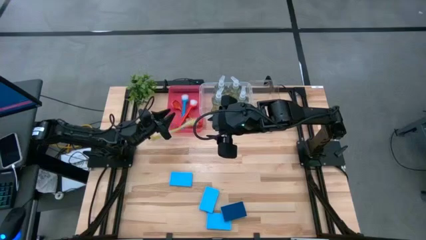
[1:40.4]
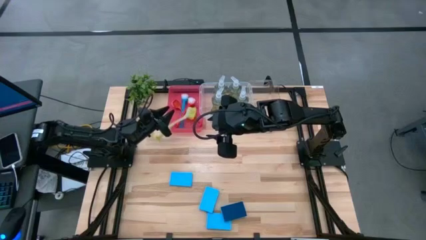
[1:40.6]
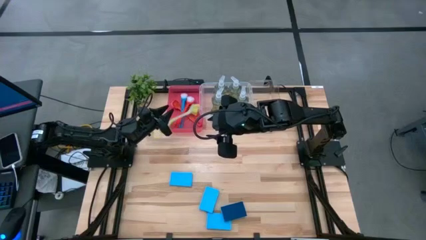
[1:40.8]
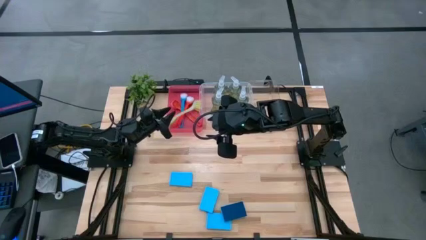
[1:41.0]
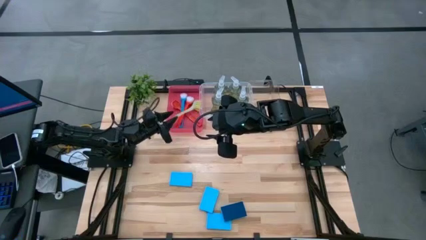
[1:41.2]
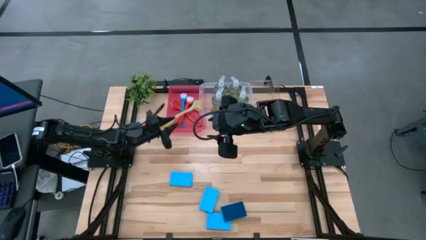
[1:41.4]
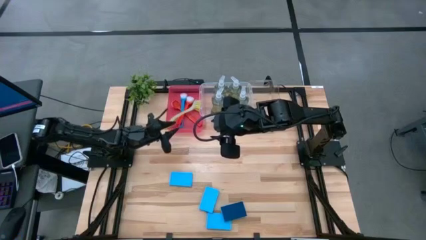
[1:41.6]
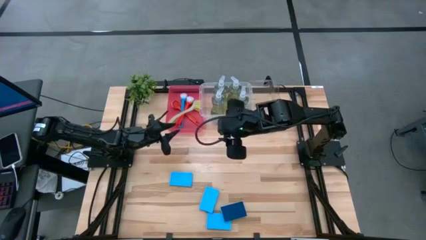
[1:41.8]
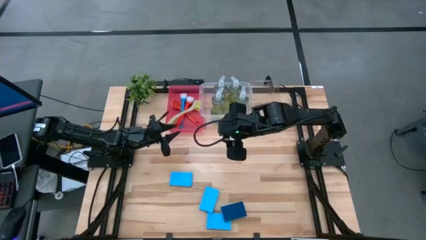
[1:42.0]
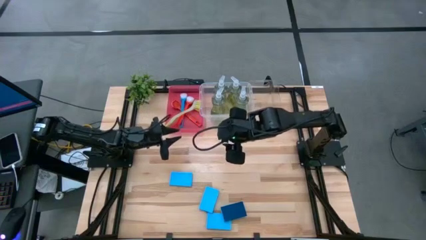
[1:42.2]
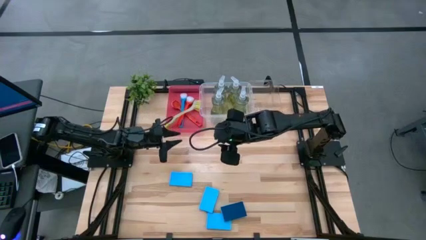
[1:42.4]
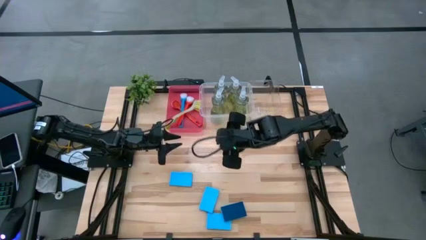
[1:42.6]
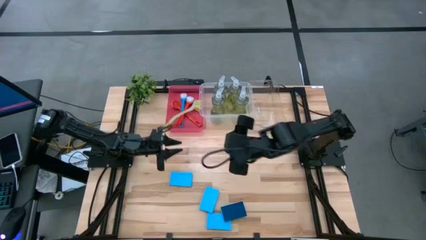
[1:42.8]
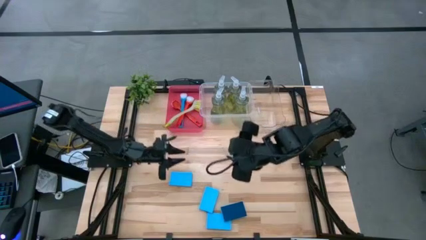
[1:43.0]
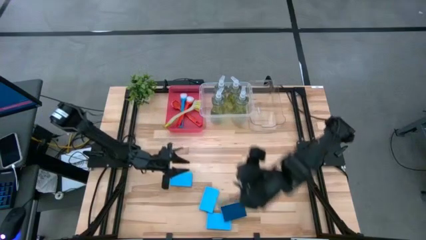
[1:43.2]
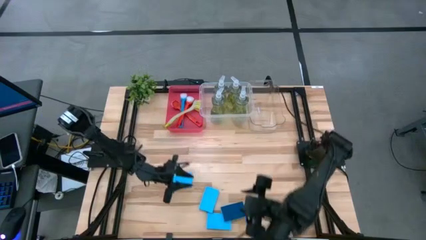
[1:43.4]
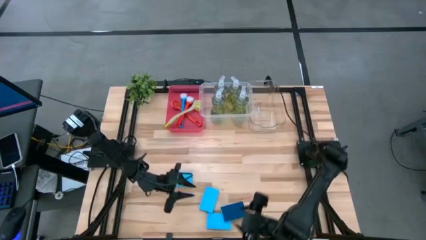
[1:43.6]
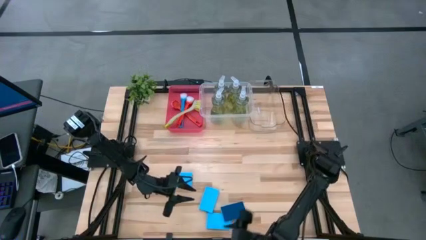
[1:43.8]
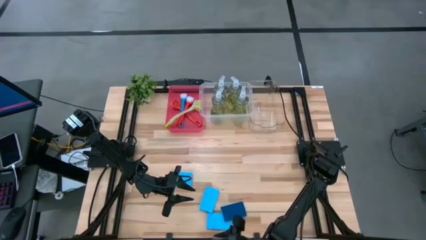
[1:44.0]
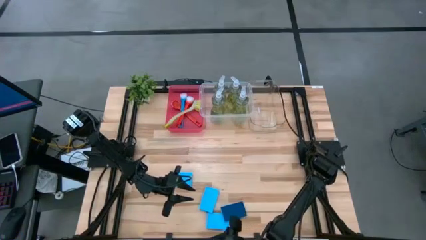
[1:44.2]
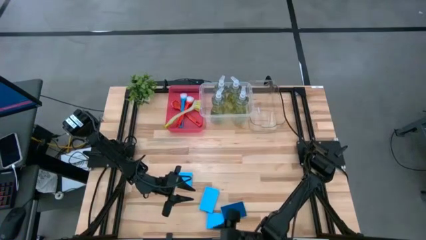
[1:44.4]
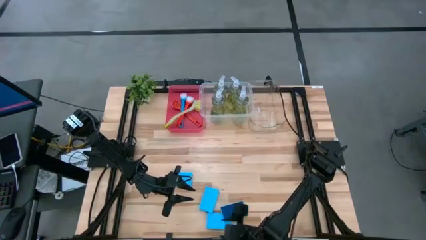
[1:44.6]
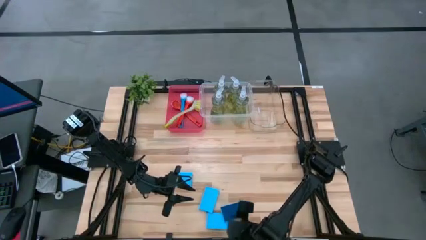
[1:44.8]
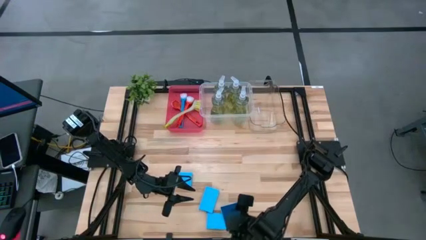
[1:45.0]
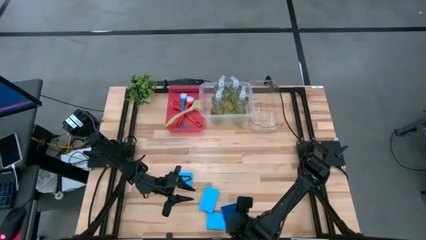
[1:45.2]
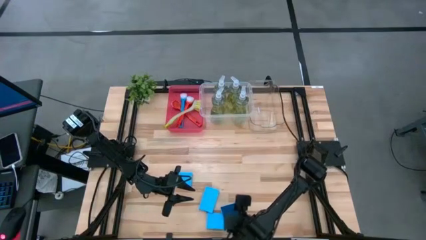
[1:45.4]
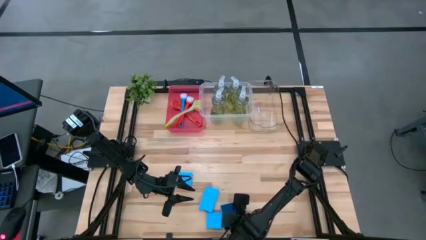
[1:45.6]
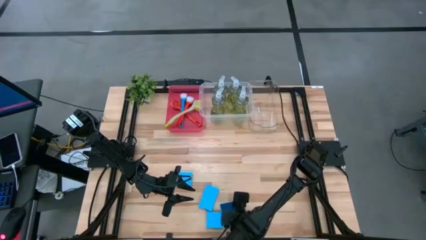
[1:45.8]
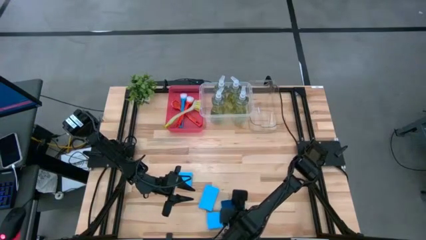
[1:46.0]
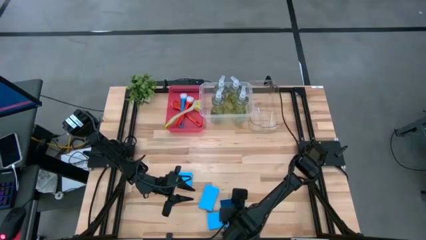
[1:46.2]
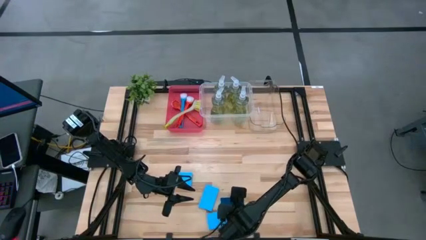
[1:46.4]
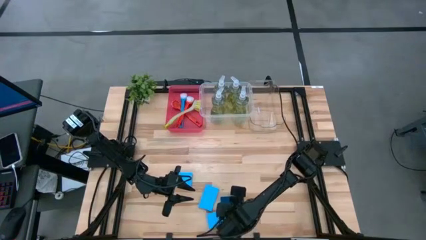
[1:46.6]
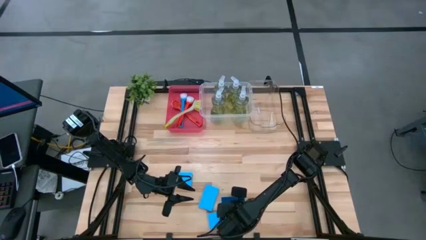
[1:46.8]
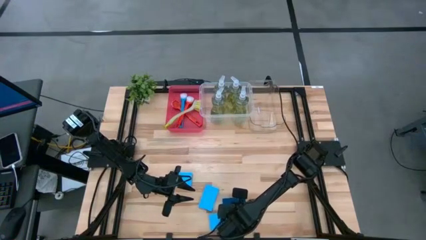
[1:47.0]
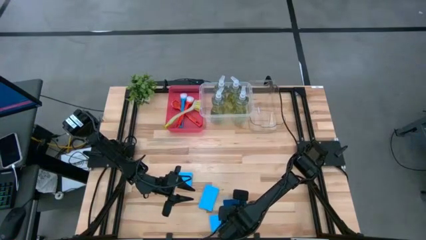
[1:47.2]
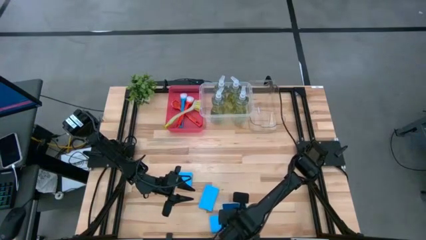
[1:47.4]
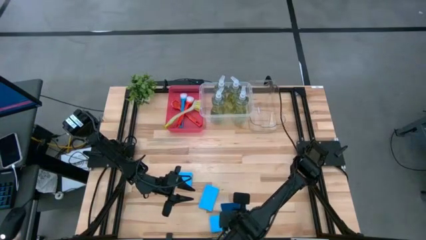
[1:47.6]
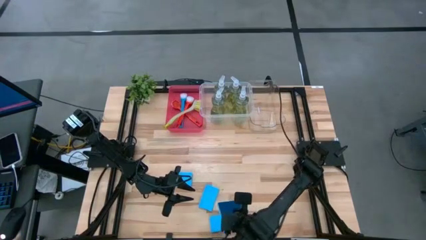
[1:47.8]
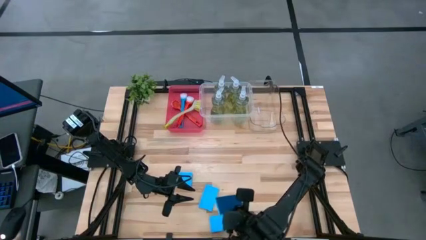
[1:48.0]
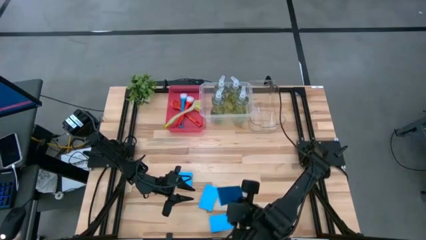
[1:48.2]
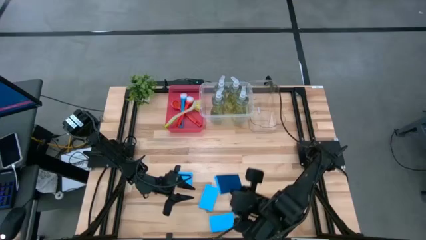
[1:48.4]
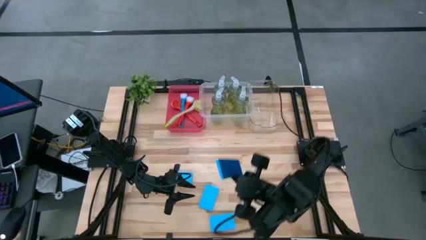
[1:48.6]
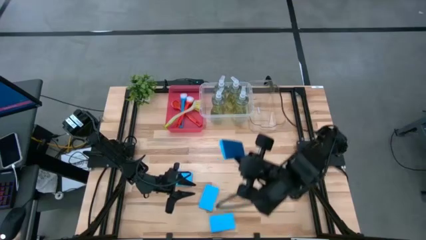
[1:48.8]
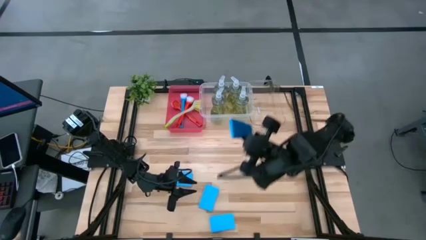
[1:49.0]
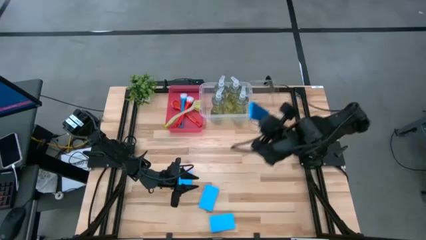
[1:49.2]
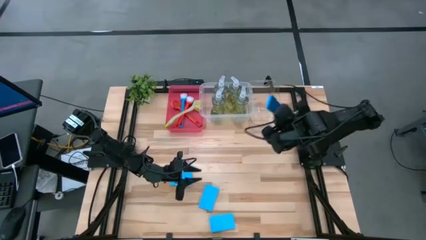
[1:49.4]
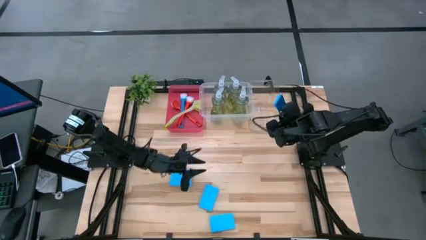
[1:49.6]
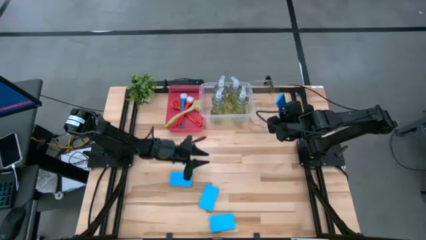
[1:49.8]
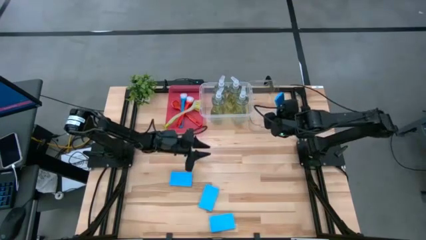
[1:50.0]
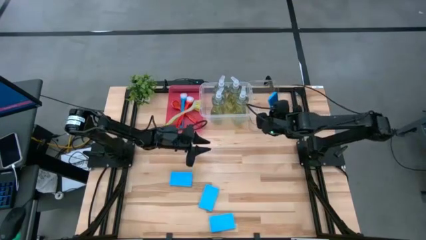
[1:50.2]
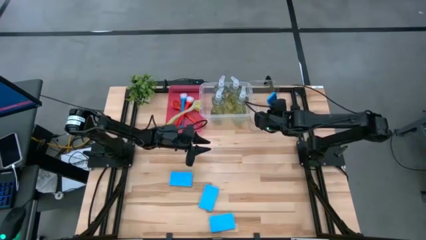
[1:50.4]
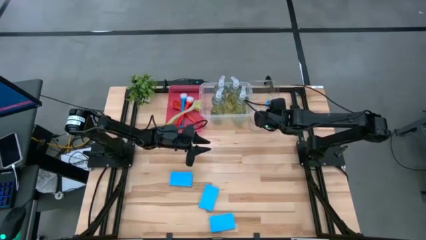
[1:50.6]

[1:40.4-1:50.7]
Task: Pick & Place Kitchen Sink Supplies
Put the blue dishwashing sponge into the transparent bin

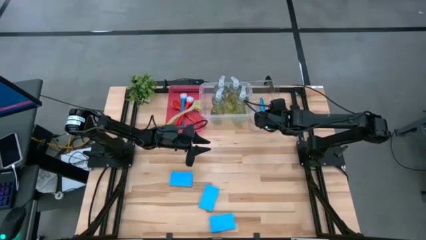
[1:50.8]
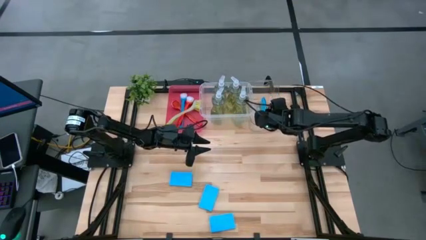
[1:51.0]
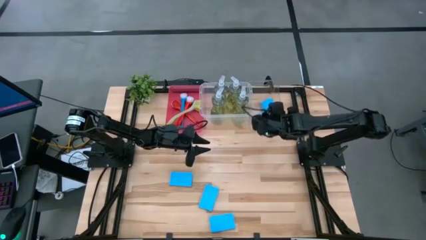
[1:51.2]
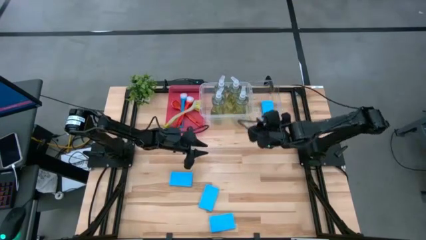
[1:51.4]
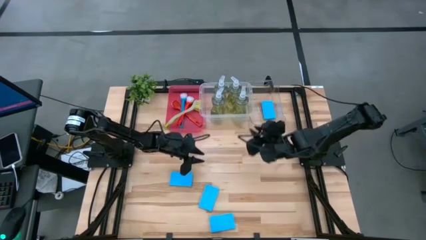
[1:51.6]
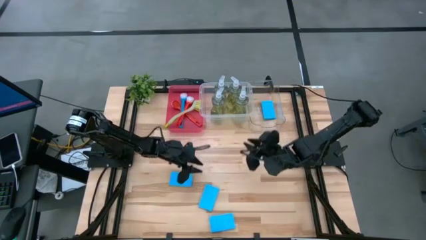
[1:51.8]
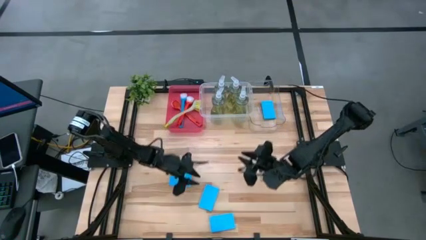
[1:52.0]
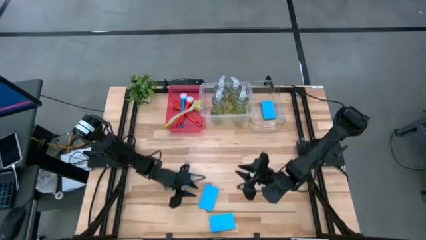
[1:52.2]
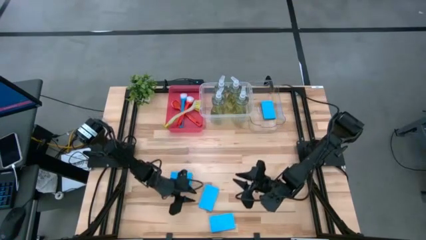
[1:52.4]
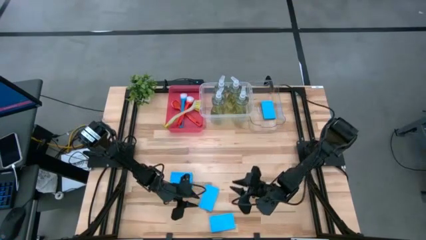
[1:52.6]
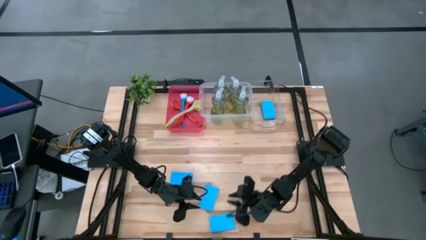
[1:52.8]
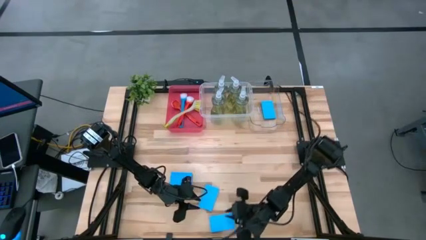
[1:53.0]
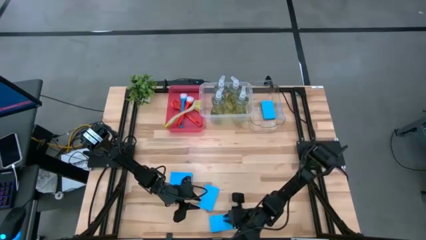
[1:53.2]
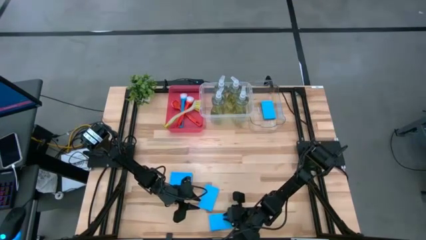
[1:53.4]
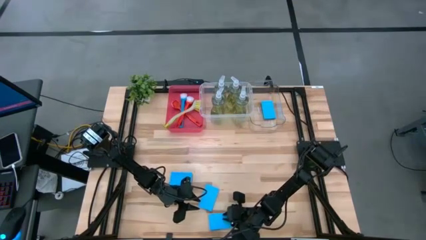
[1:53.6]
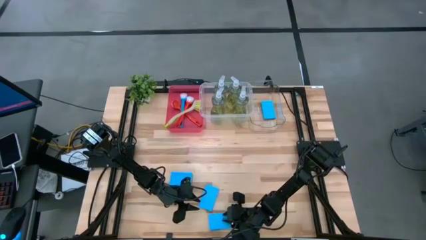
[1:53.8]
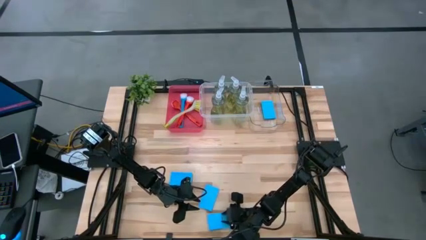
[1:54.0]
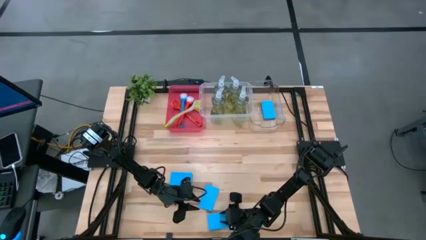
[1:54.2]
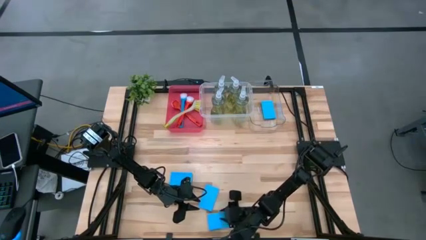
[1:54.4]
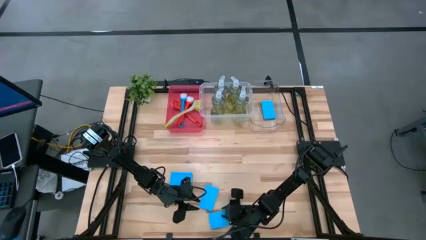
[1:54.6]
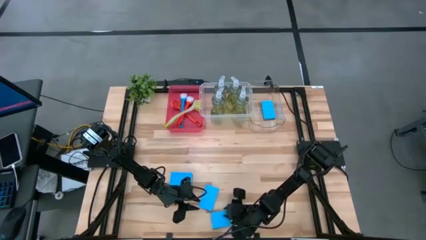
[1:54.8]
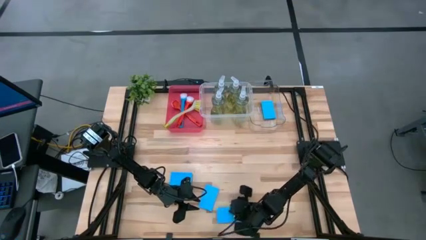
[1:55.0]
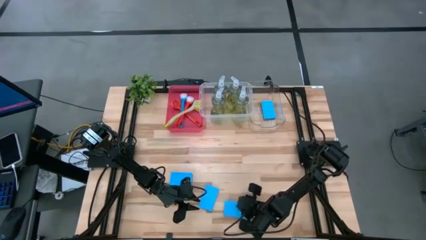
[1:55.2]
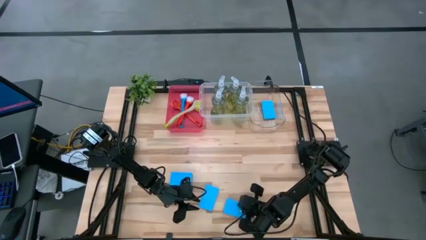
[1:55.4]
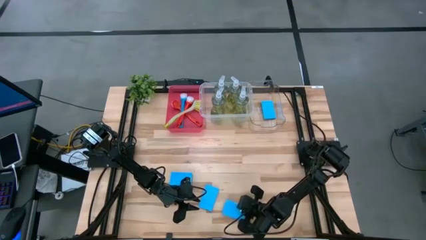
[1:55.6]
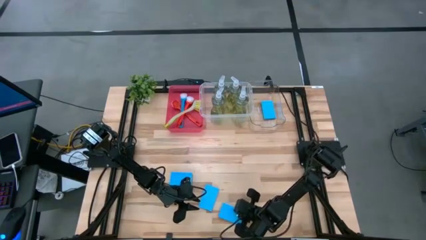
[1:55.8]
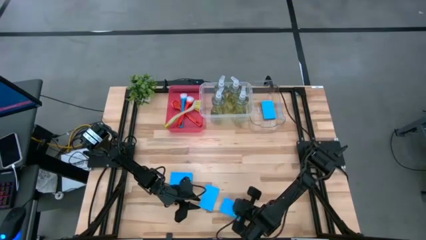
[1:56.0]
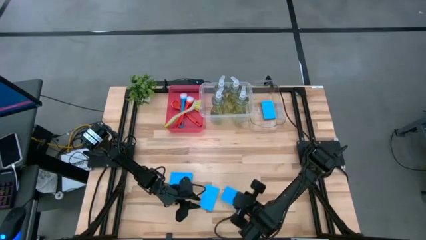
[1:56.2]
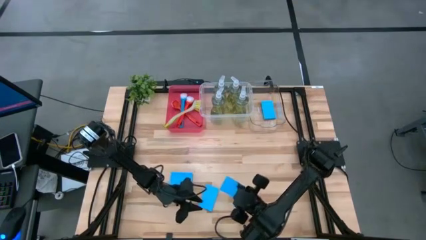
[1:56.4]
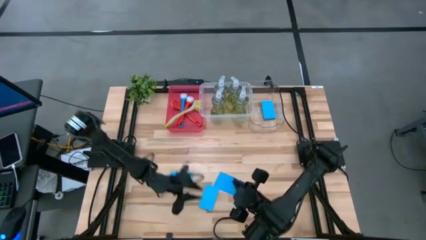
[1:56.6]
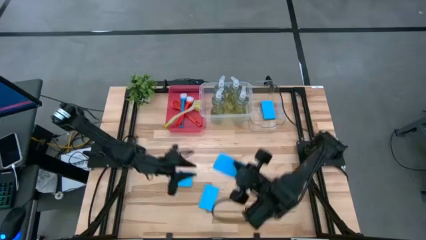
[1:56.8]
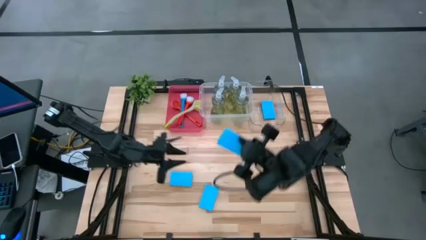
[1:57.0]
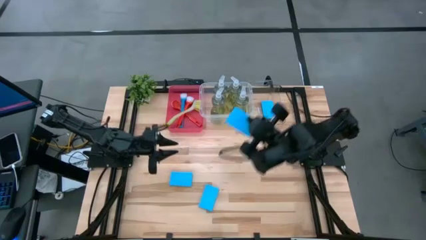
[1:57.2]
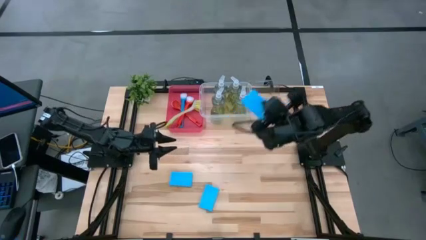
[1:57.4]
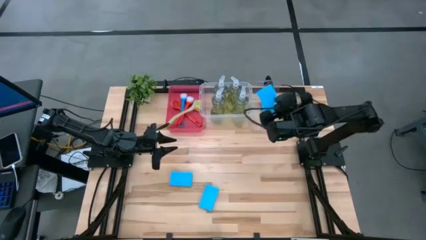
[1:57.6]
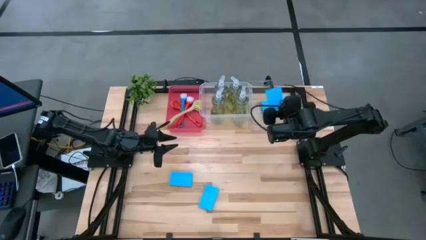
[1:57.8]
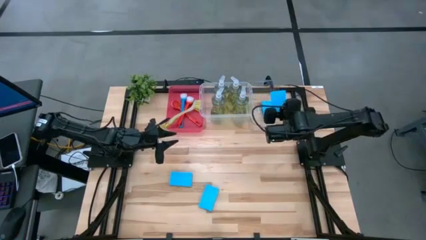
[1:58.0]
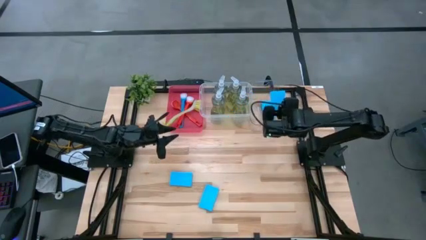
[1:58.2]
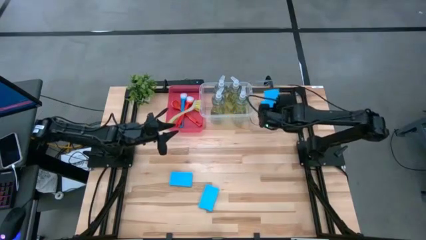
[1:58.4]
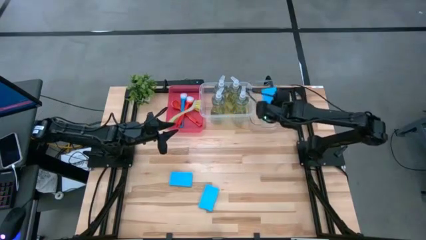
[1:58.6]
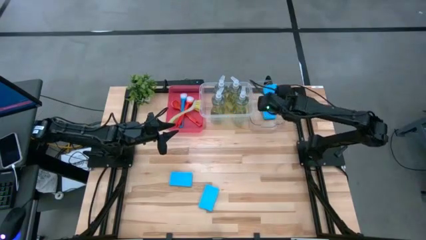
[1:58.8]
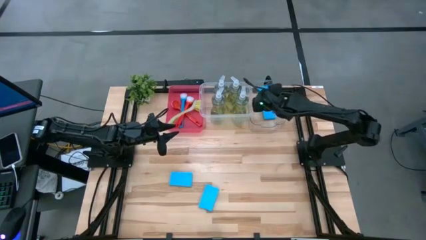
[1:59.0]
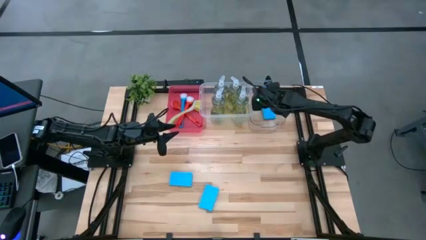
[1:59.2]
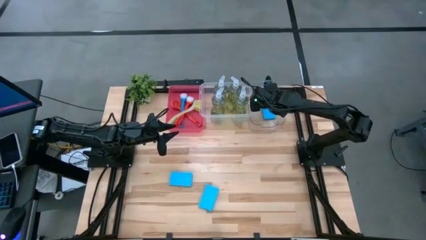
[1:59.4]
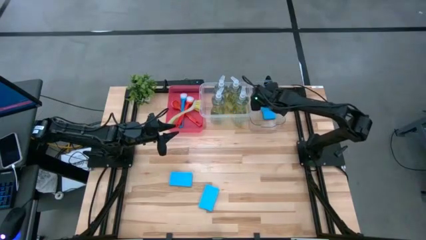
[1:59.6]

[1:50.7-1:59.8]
Put the blue dishwashing sponge into the transparent bin
